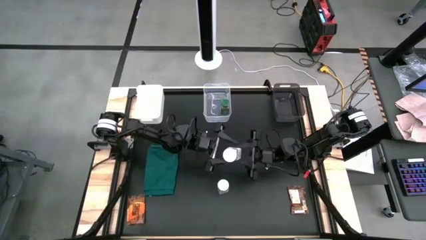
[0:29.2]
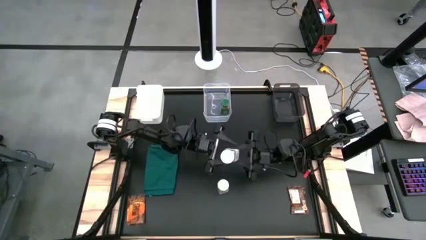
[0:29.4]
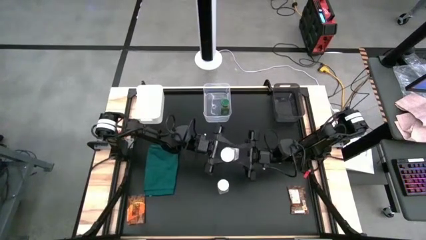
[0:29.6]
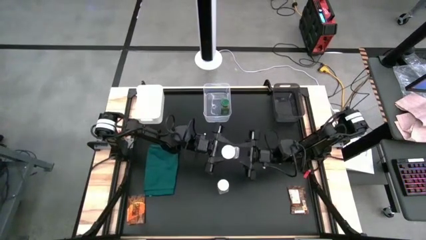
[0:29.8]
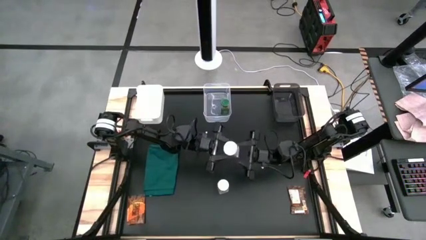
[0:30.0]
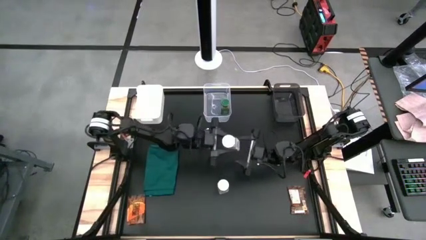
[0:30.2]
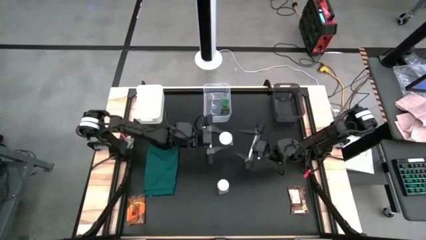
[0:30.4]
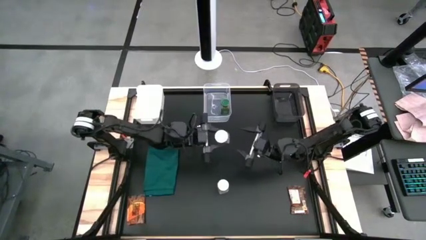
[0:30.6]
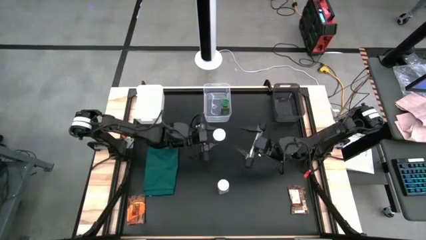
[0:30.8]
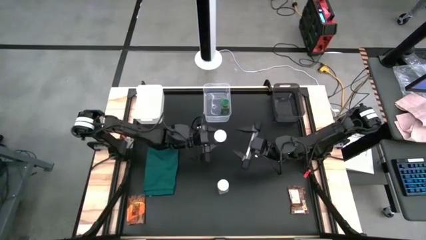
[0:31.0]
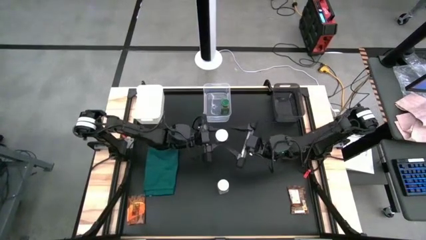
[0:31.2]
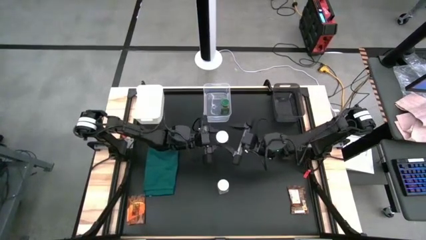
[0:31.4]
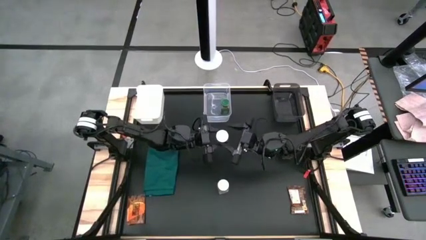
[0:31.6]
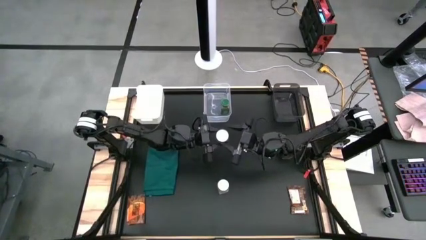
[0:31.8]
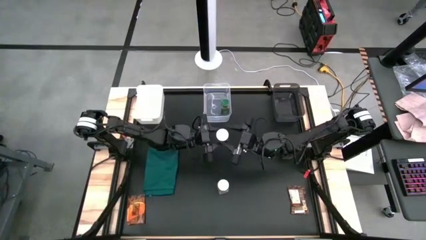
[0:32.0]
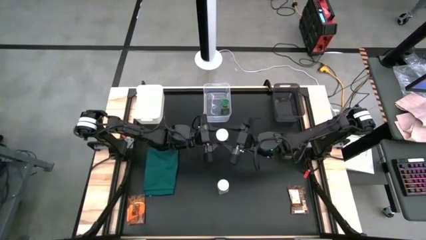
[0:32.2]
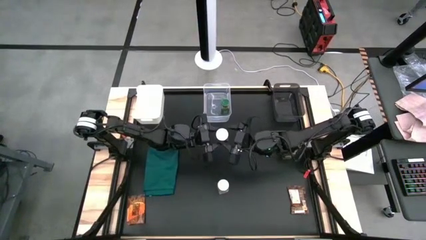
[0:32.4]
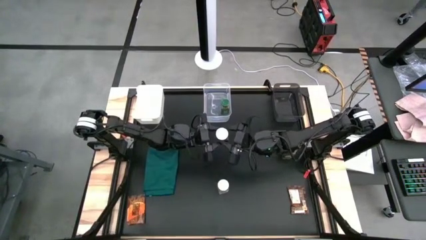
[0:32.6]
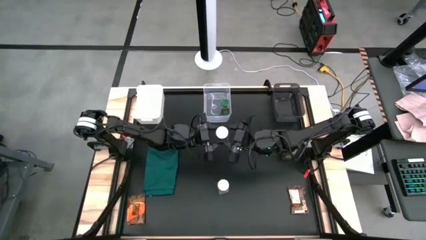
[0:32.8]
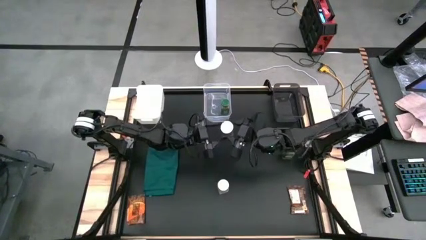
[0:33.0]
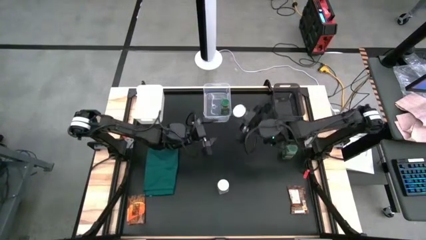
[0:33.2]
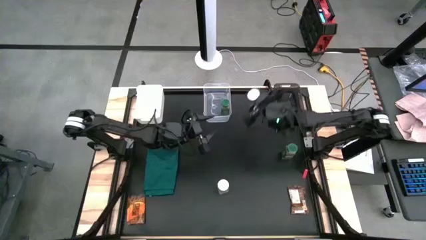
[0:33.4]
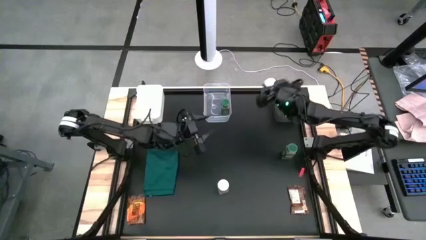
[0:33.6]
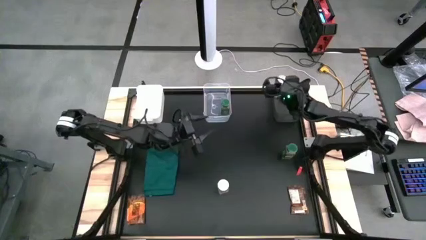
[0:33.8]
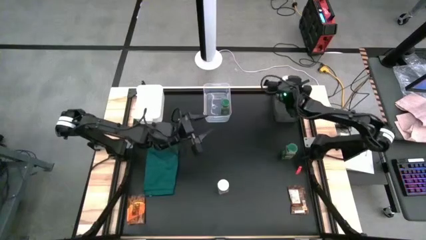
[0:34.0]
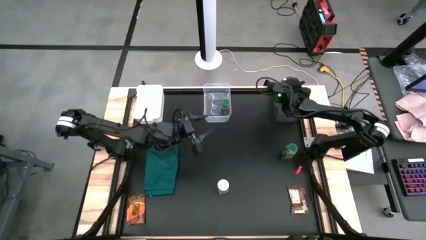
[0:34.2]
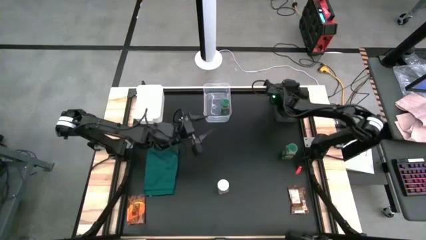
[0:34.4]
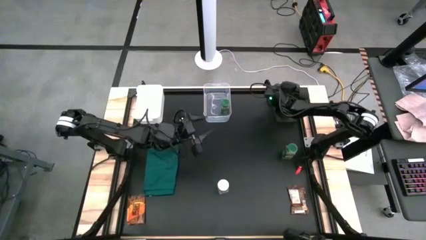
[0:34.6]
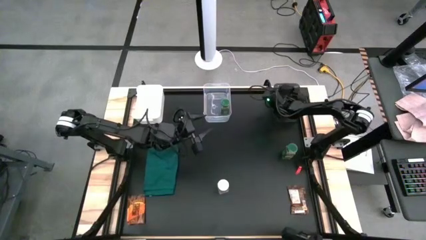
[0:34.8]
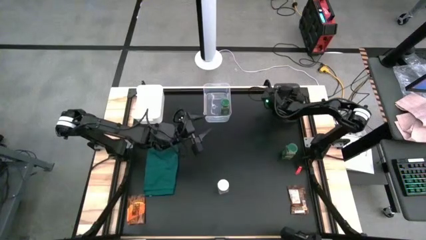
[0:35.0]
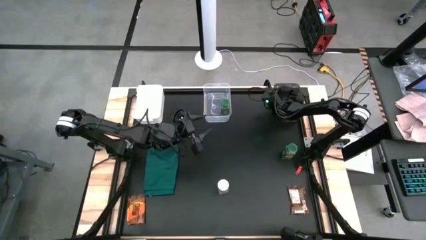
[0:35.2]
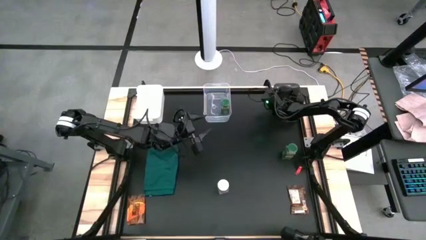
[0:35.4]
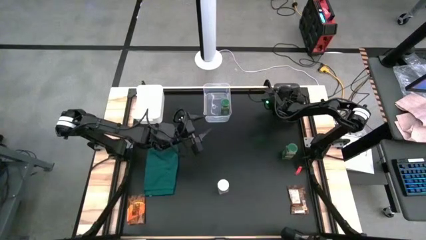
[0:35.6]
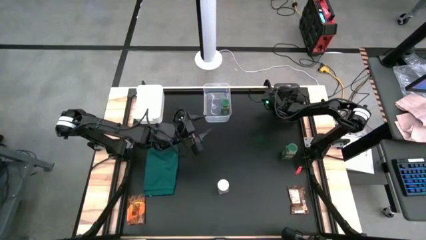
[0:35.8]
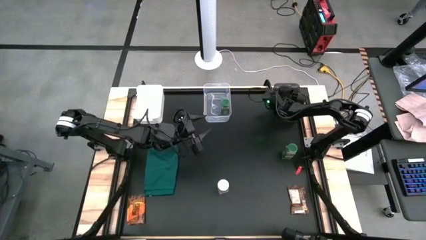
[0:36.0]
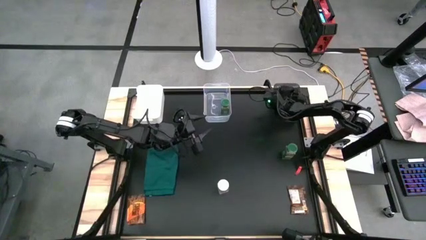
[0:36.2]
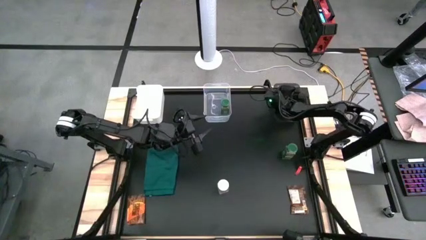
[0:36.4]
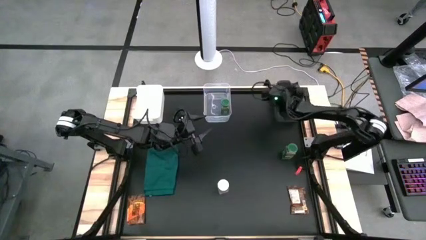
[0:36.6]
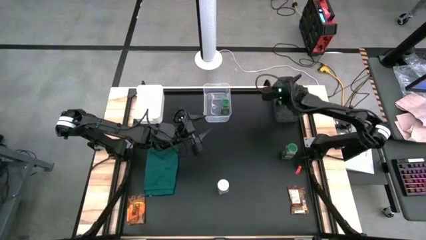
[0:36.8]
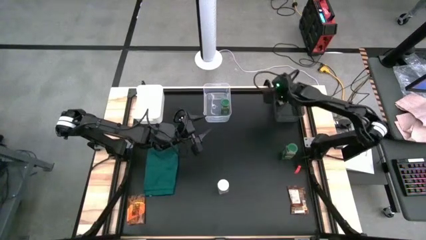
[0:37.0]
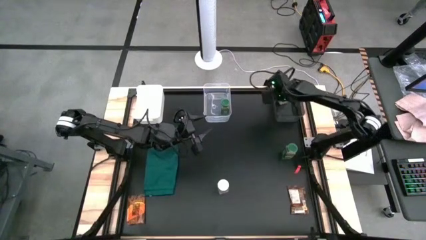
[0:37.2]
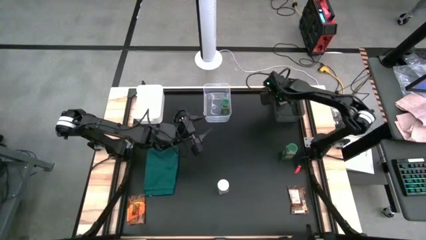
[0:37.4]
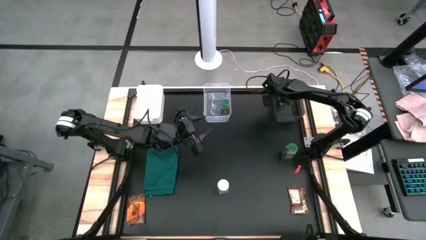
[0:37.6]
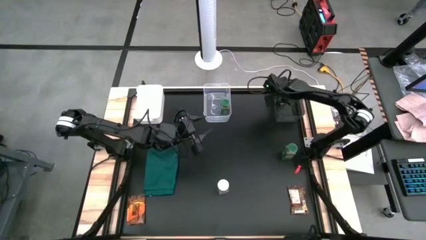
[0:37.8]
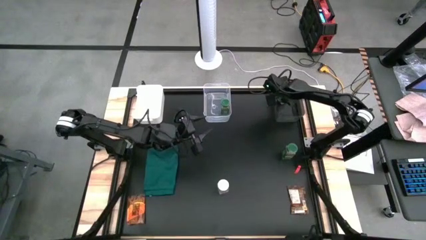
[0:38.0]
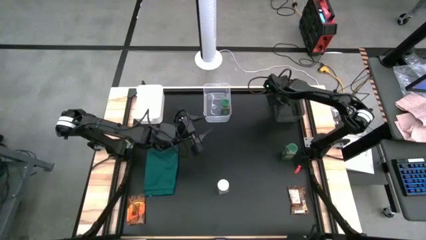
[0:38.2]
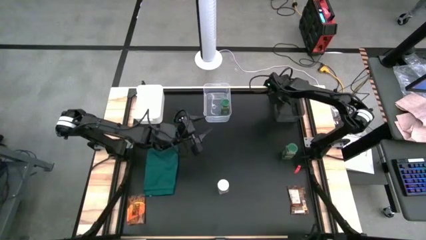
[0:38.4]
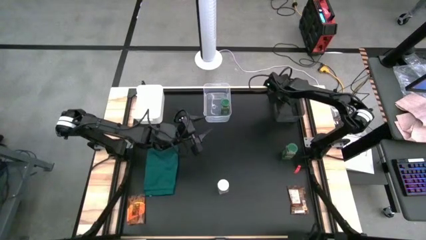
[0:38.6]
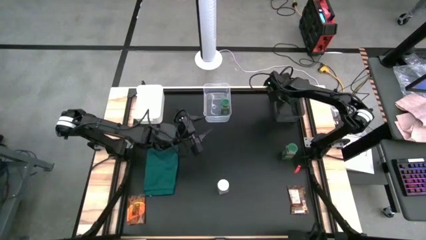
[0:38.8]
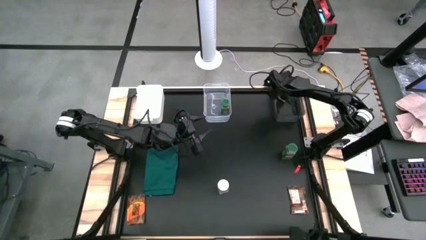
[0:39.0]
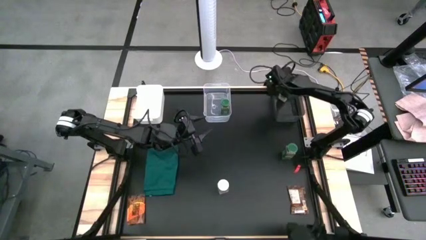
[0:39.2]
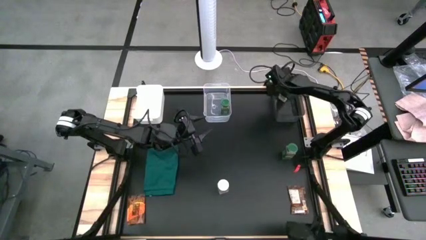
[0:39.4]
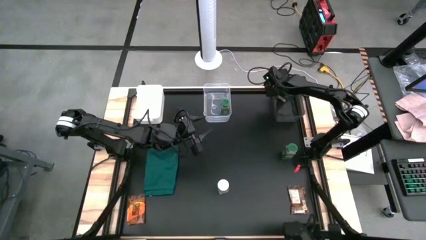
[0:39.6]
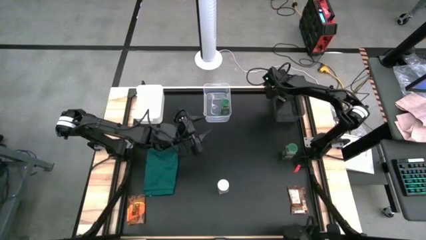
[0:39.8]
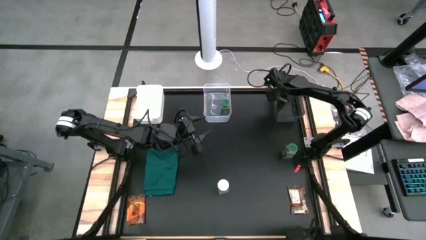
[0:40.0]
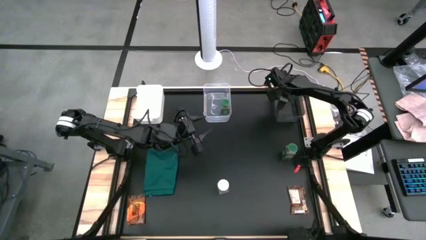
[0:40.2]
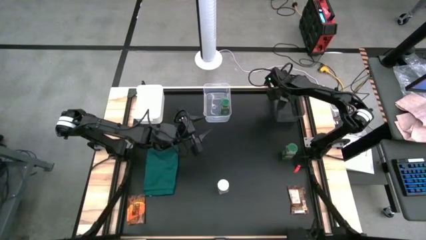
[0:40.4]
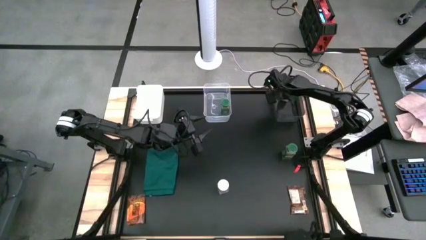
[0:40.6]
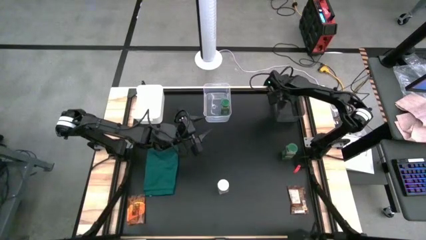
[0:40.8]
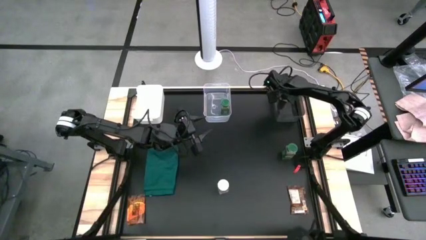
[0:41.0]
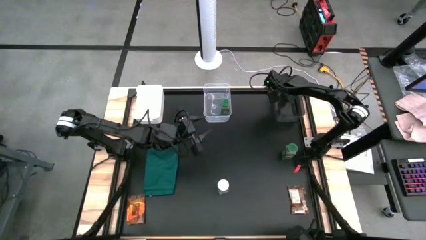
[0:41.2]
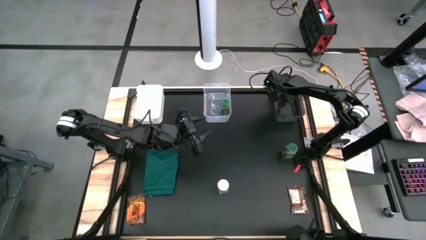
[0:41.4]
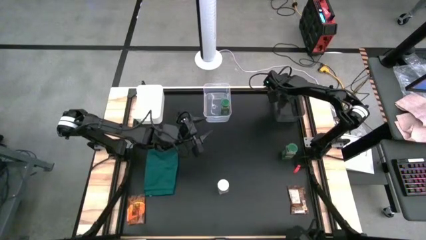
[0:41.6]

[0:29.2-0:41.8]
Task: Sort spices by type
Put the top white seasoning bottle into the black bin

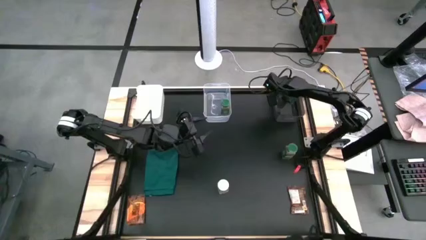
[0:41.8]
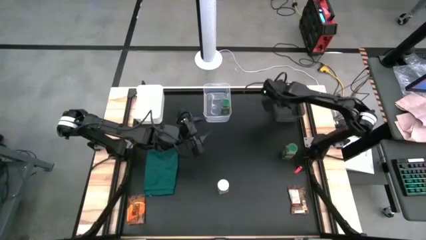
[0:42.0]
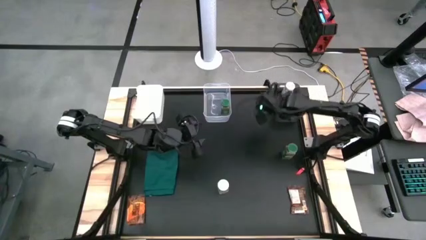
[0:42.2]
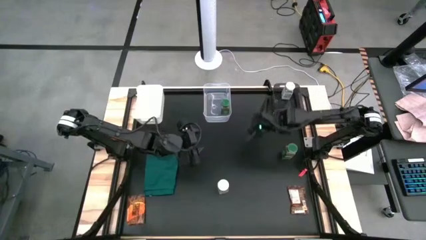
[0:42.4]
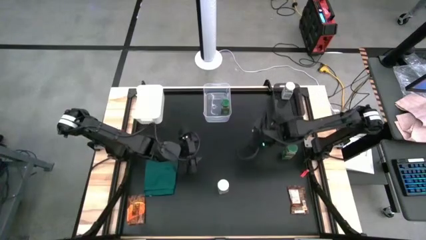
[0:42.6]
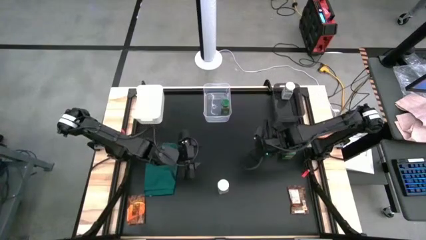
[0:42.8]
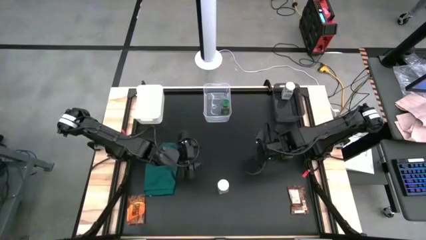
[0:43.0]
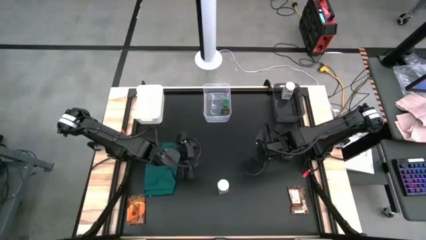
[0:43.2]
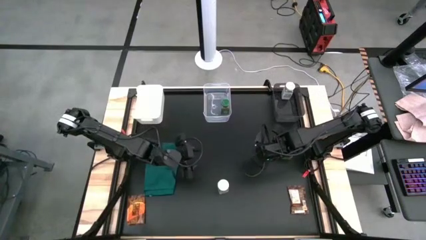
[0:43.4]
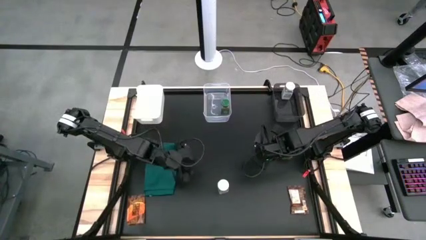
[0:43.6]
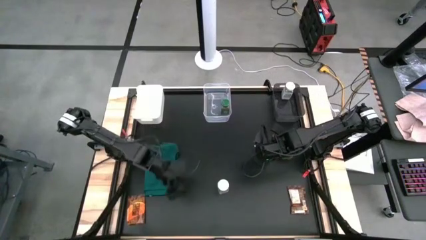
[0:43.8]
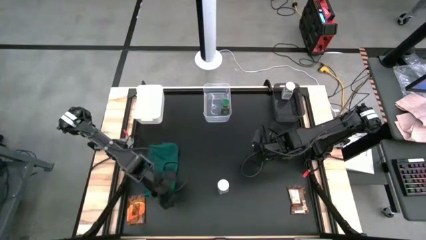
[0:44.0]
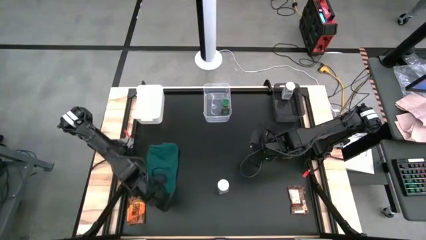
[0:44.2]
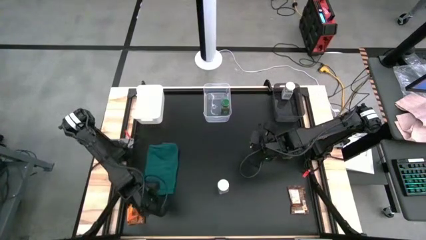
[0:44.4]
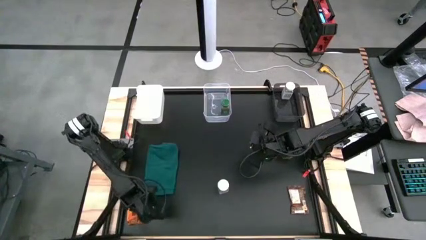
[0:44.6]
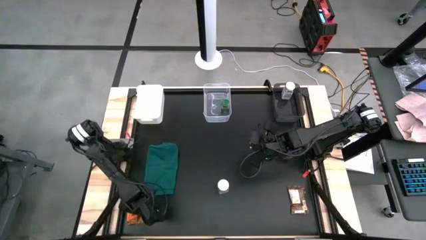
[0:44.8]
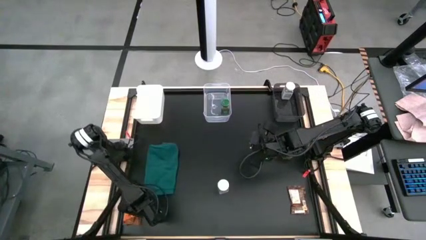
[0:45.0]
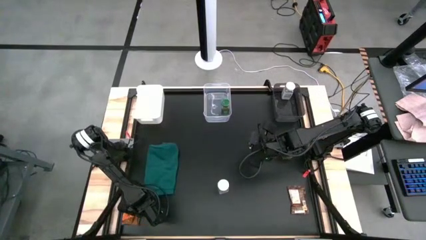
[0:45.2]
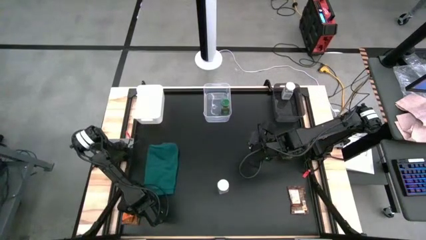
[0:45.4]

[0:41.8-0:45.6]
Put the left orange seasoning pack into the white bin
